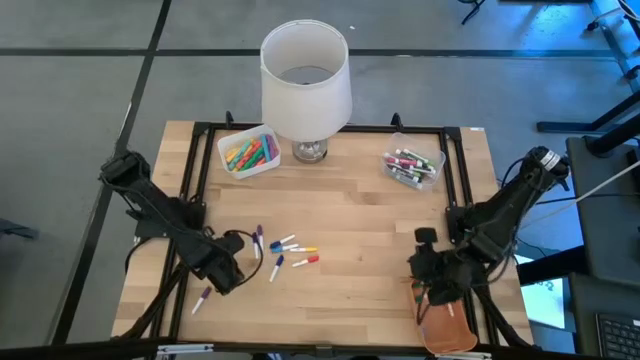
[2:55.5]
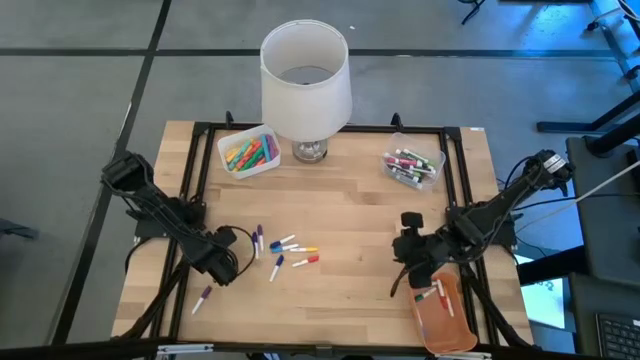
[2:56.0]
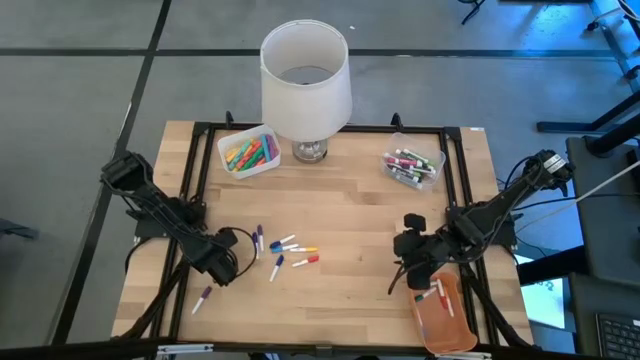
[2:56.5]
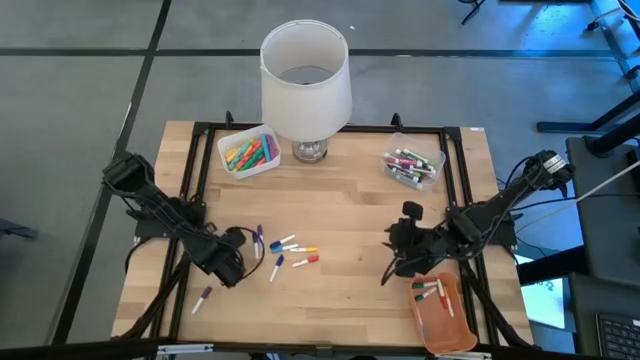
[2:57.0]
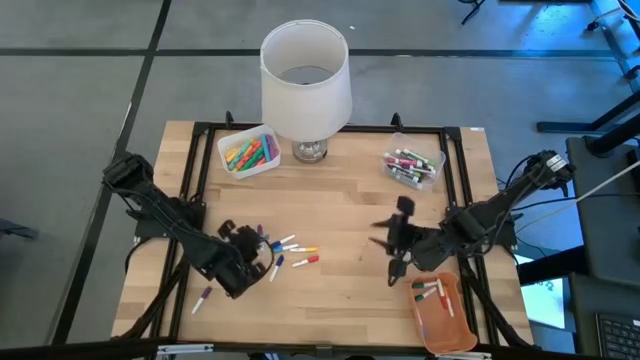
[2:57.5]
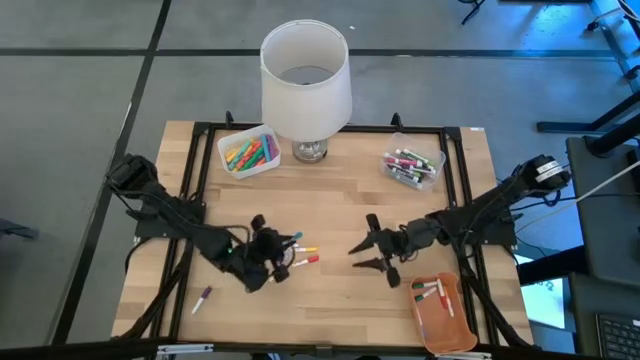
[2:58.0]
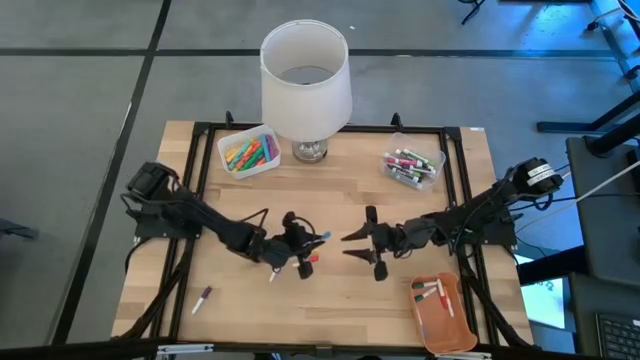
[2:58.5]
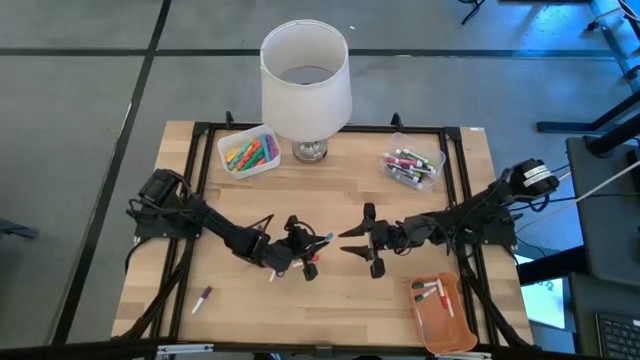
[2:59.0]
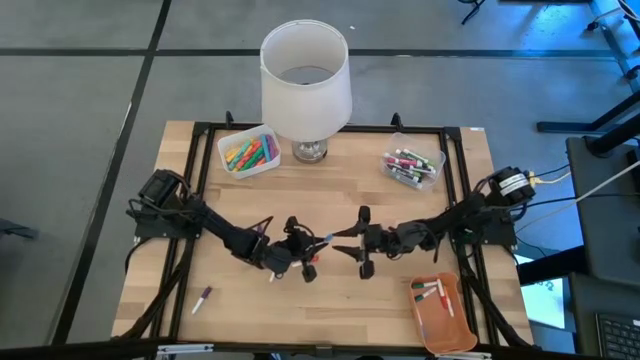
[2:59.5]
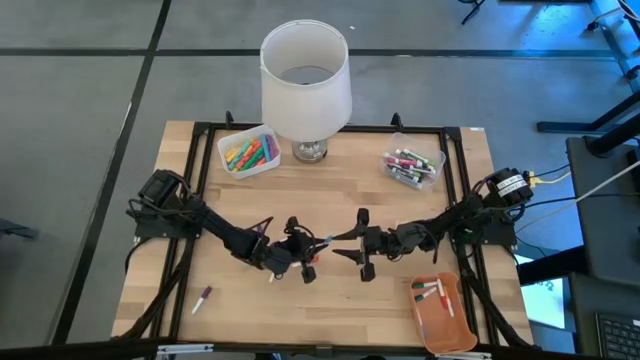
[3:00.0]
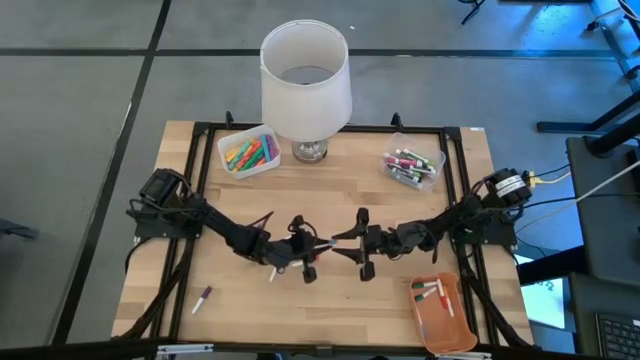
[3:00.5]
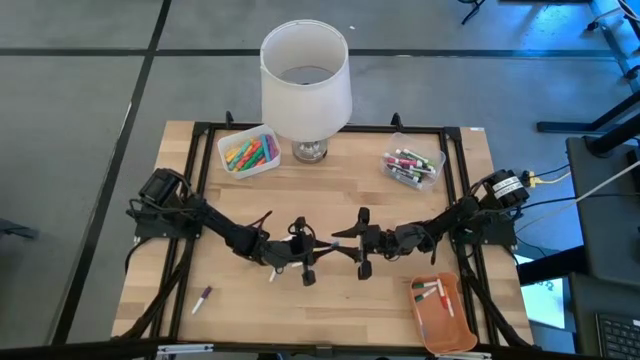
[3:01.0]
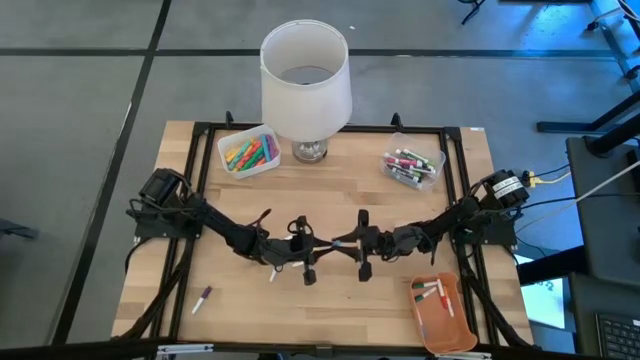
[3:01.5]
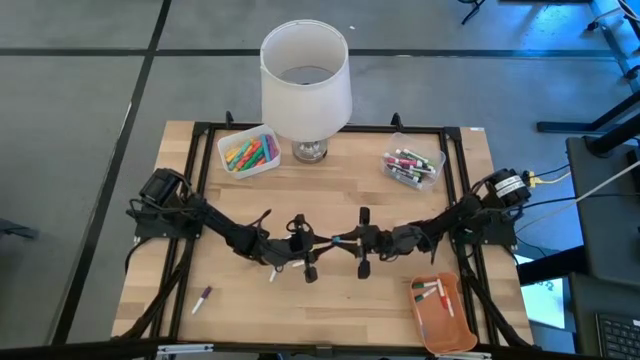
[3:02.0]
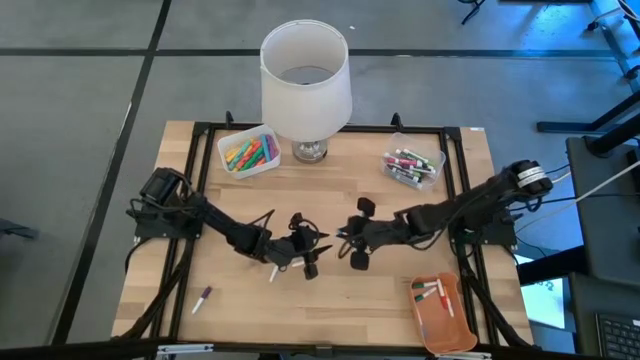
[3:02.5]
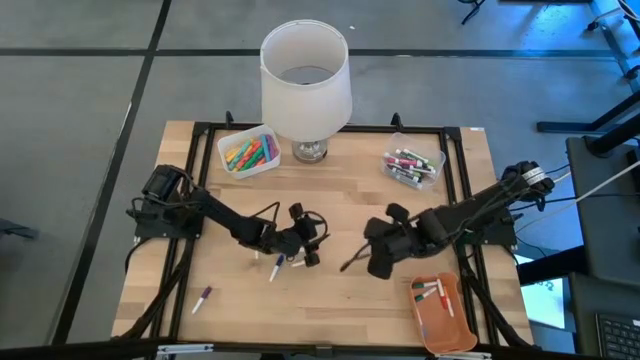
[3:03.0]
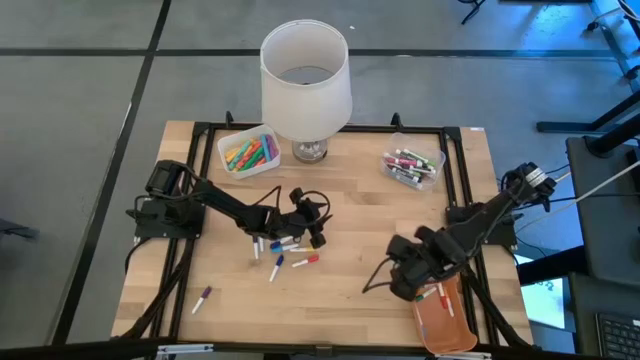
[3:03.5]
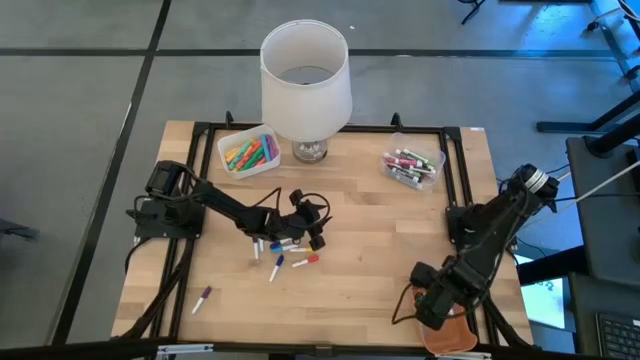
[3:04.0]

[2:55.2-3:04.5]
Task: Pick & Place Markers
Put the light blue mini marker into the orange bin

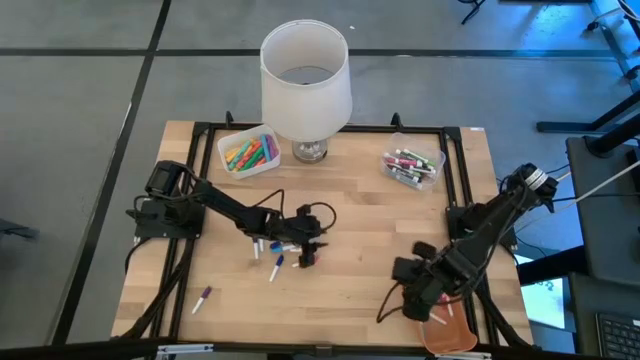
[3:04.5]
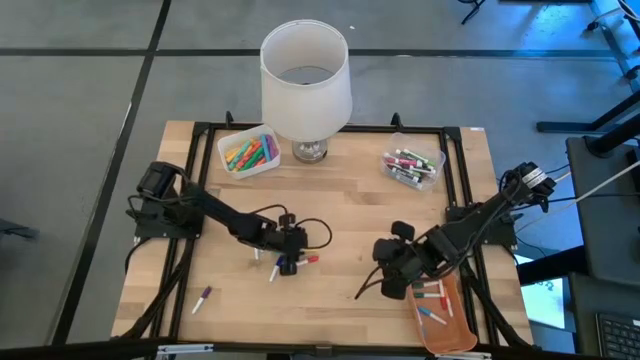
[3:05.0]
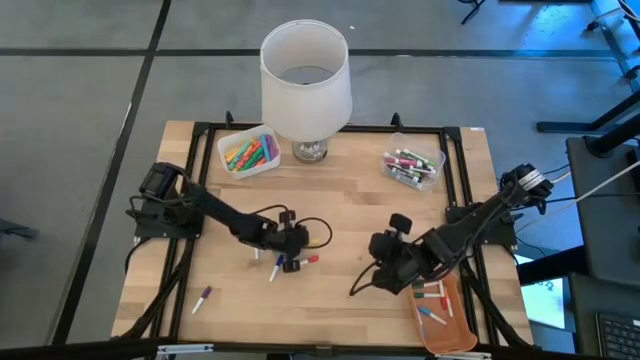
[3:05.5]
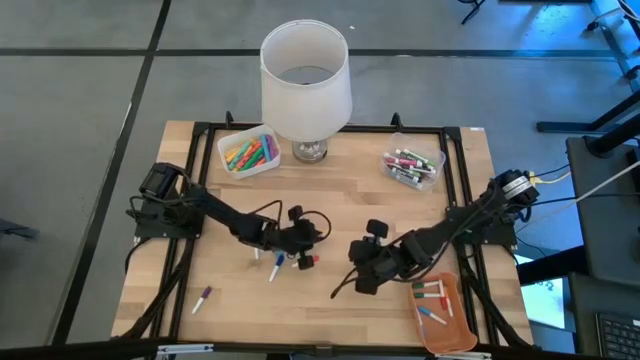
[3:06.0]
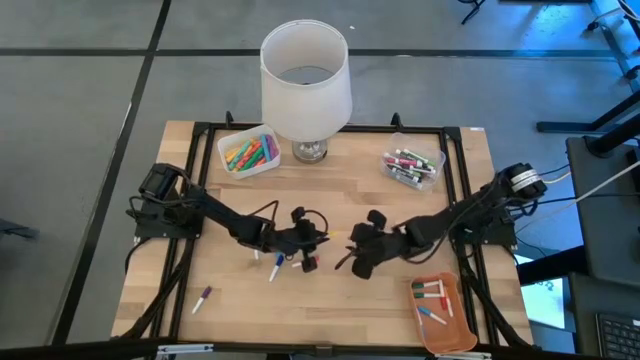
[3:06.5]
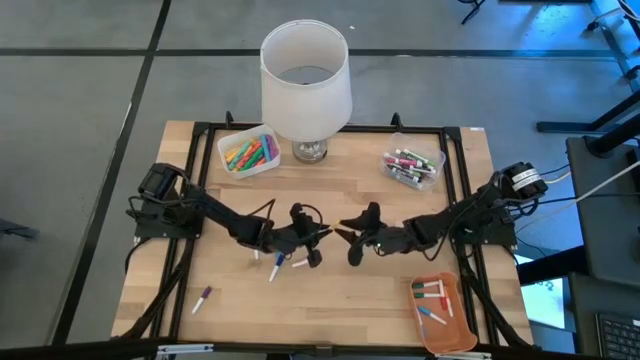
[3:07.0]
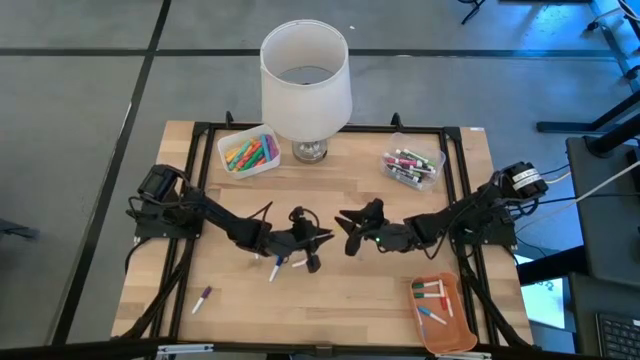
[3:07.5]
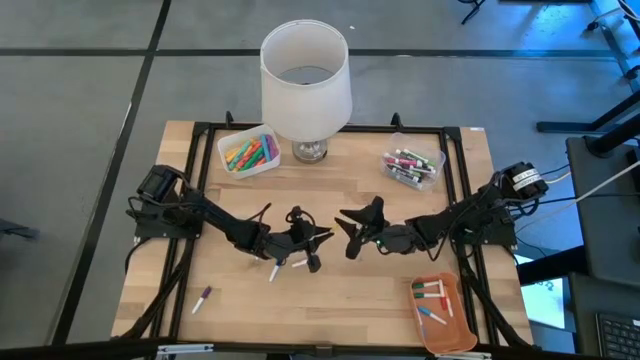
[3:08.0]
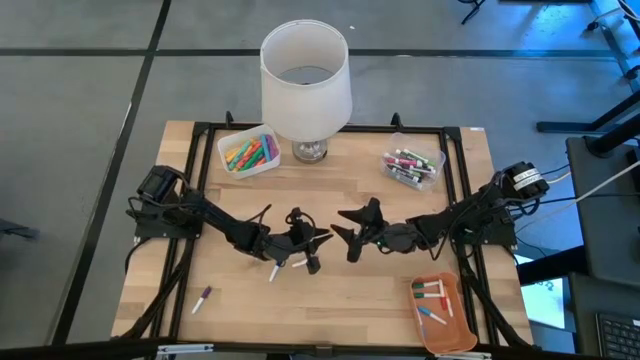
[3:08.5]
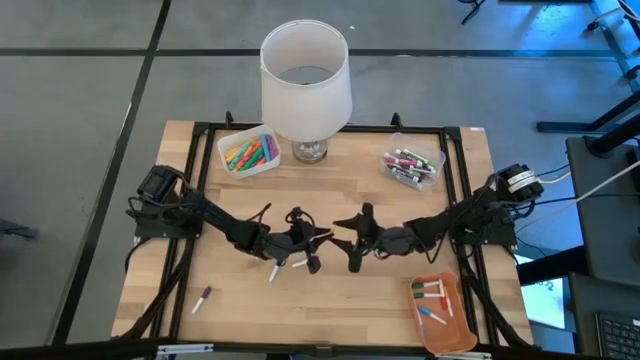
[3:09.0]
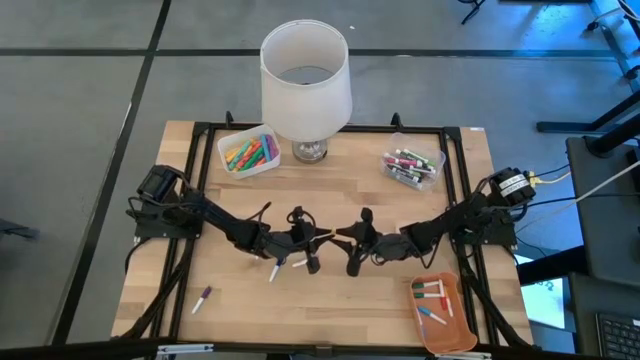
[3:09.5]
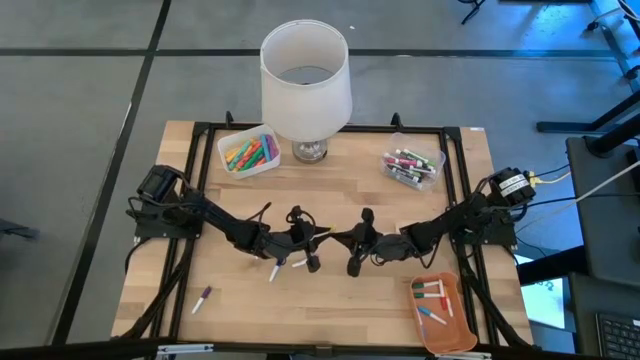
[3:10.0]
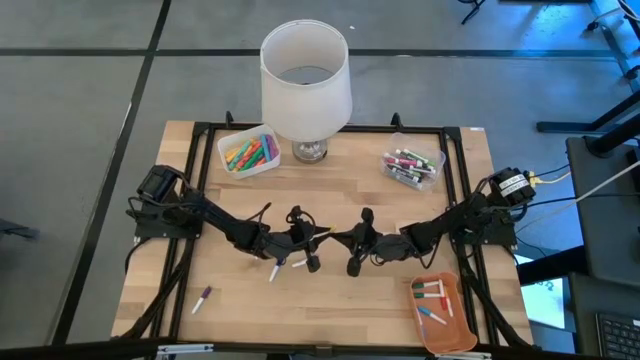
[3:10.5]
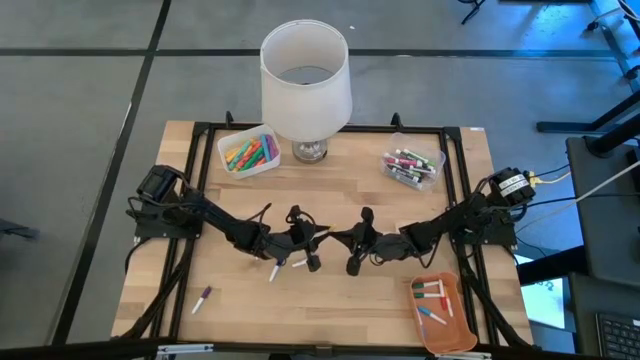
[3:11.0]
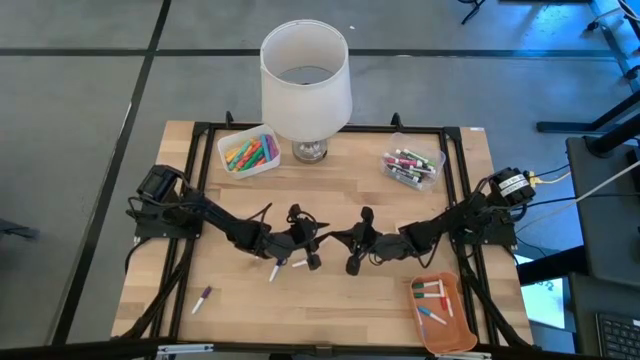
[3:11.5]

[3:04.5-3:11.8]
Put the yellow mini marker into the orange bin

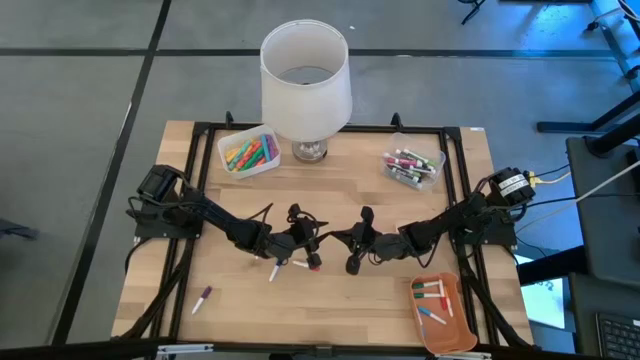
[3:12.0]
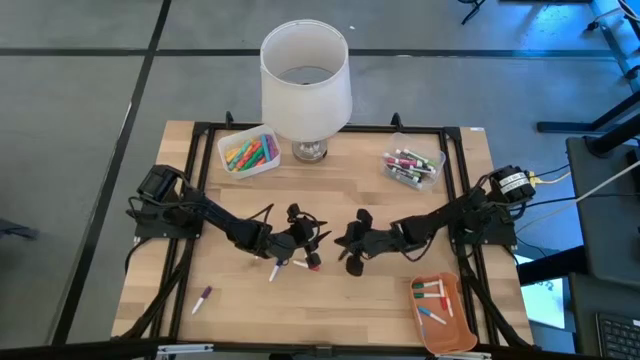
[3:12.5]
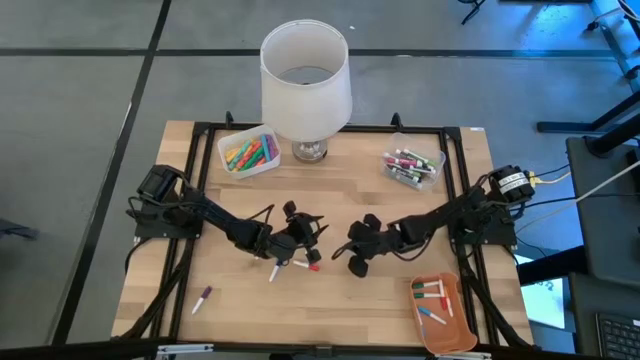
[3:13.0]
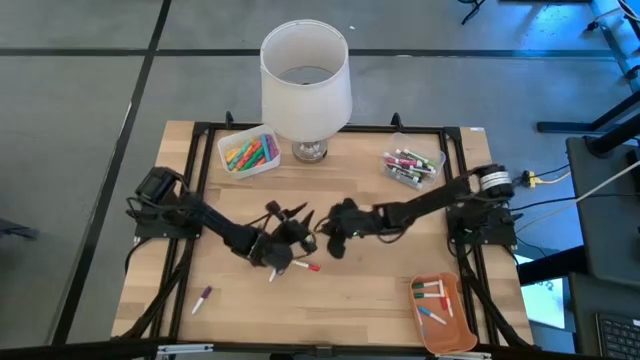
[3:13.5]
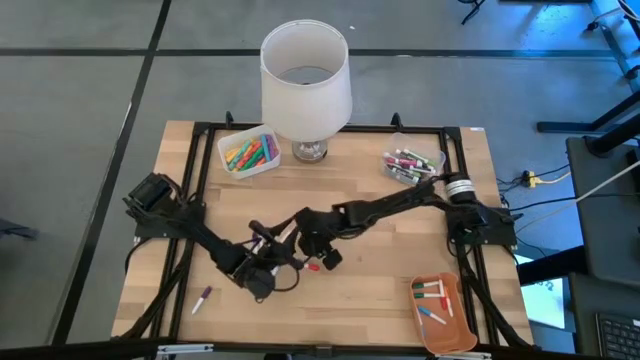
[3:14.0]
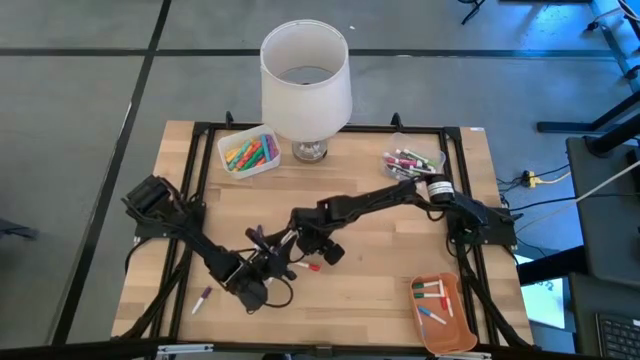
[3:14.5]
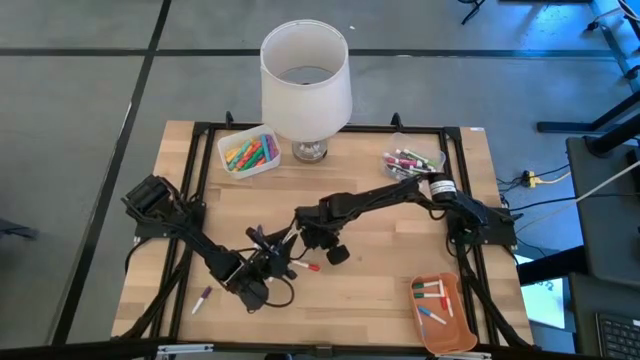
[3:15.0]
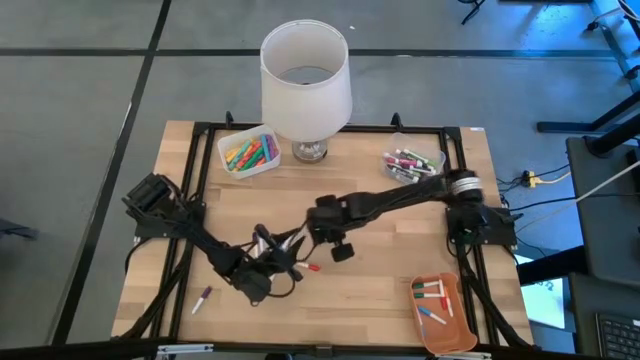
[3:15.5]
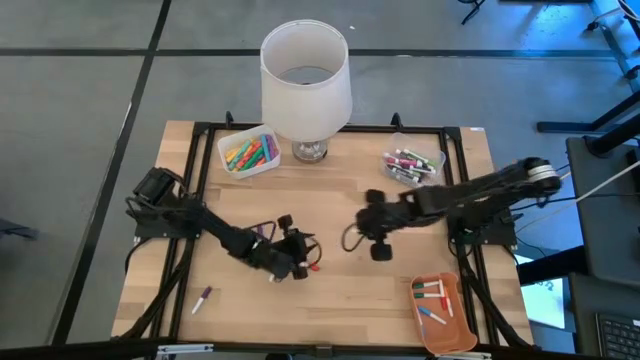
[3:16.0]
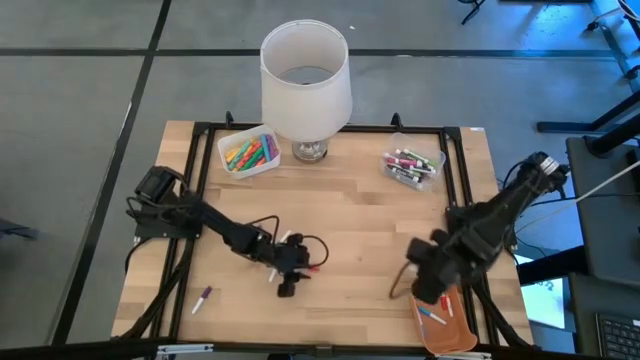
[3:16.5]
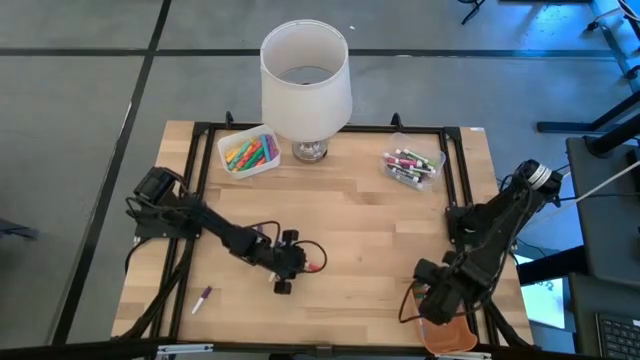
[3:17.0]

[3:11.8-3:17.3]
Put the yellow mini marker into the orange bin
